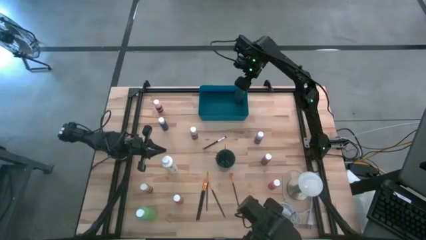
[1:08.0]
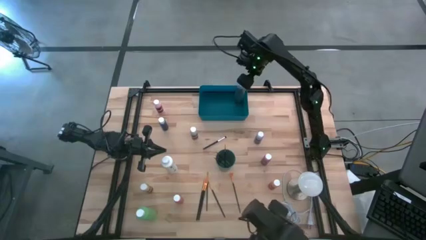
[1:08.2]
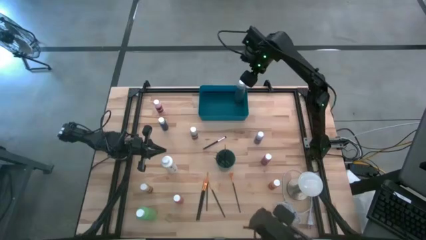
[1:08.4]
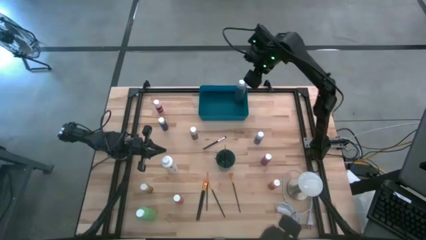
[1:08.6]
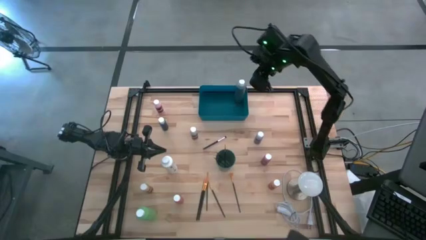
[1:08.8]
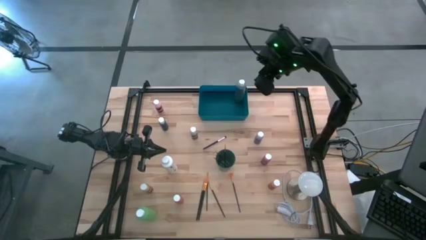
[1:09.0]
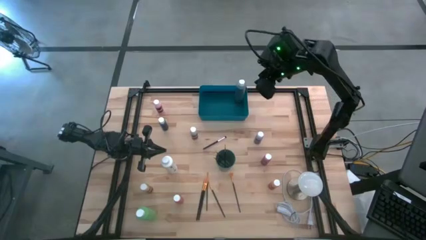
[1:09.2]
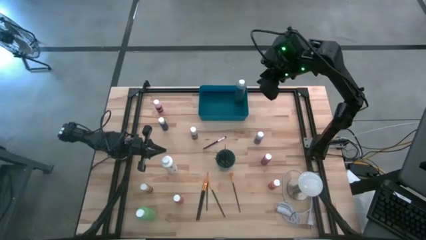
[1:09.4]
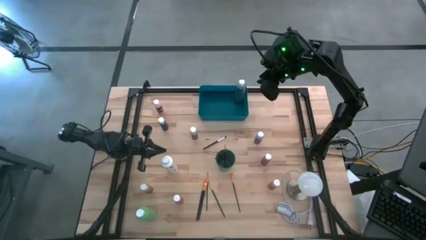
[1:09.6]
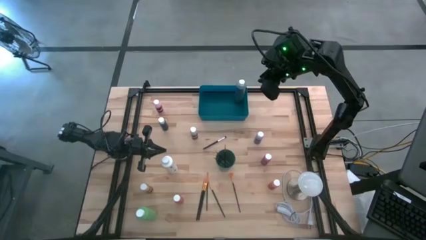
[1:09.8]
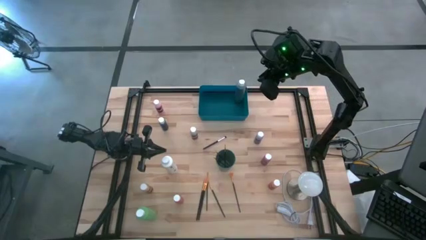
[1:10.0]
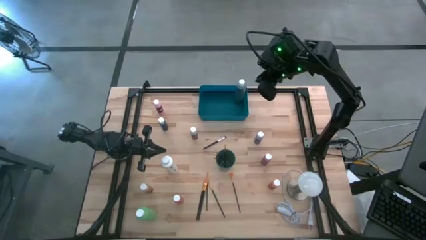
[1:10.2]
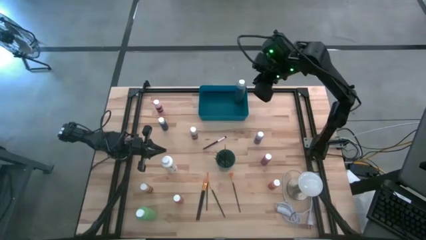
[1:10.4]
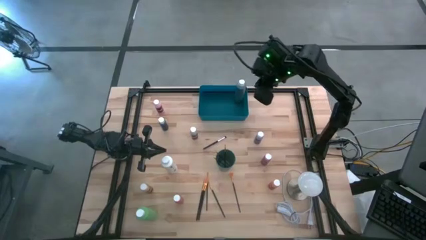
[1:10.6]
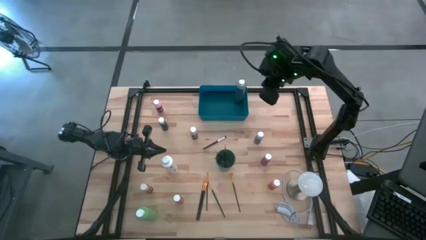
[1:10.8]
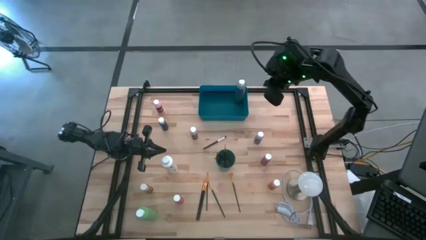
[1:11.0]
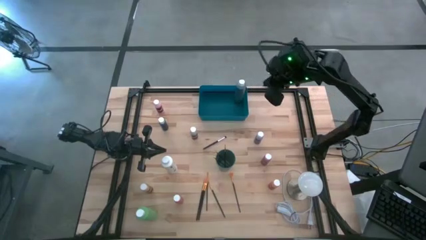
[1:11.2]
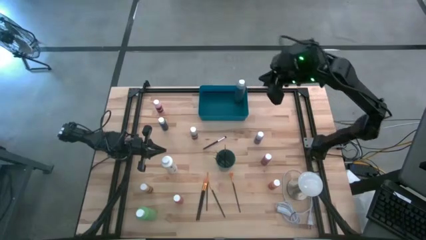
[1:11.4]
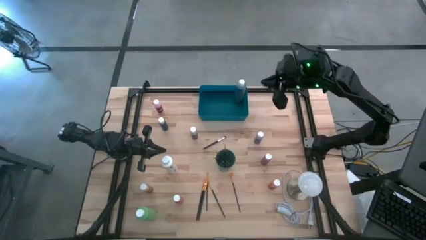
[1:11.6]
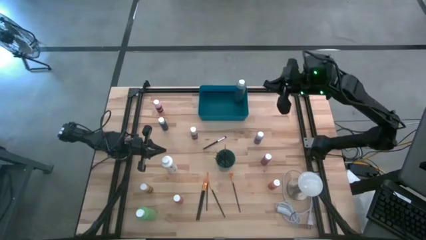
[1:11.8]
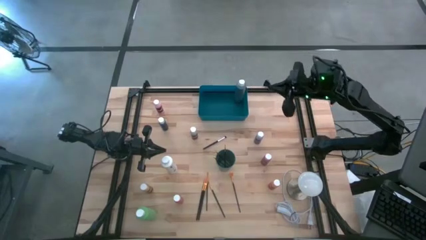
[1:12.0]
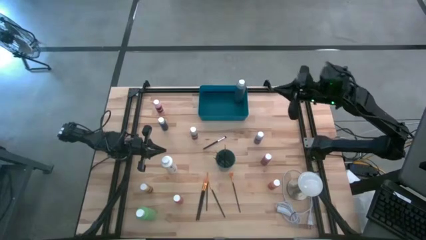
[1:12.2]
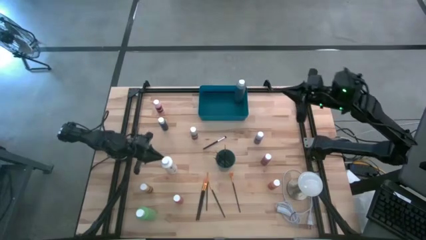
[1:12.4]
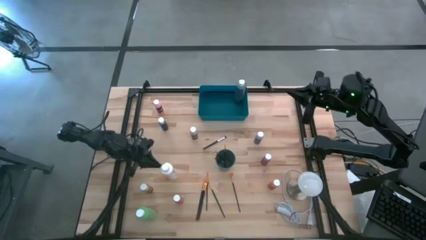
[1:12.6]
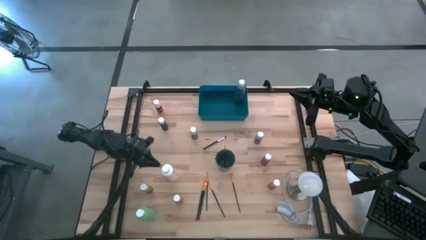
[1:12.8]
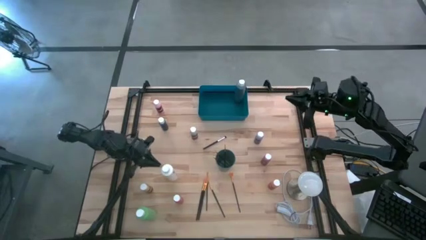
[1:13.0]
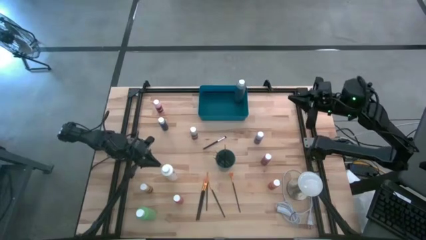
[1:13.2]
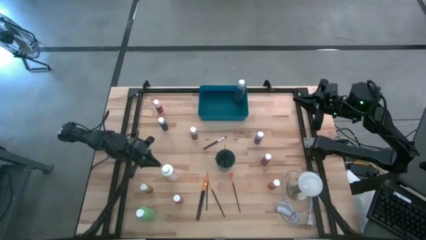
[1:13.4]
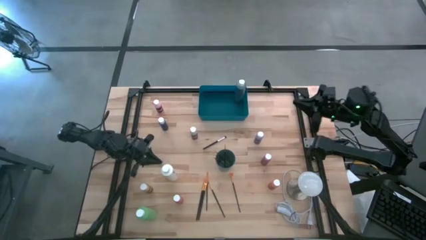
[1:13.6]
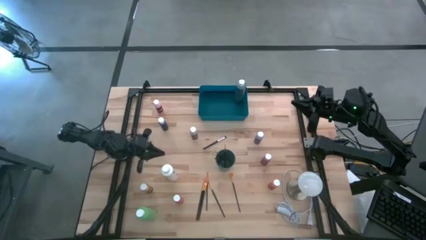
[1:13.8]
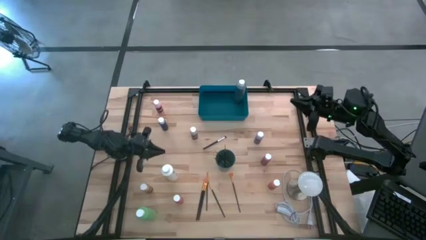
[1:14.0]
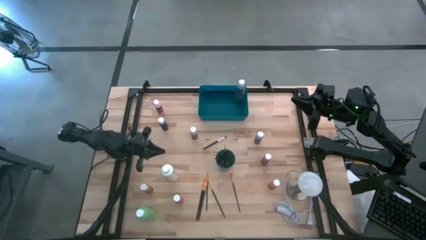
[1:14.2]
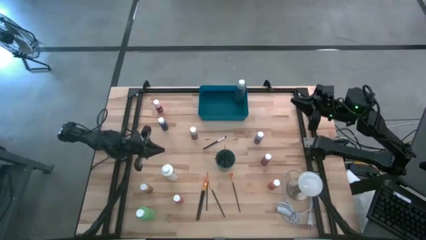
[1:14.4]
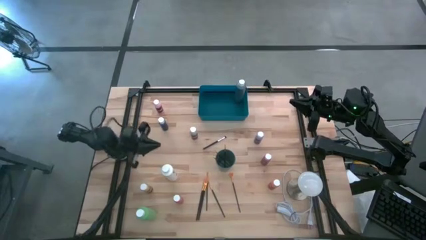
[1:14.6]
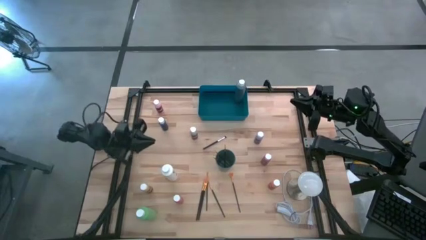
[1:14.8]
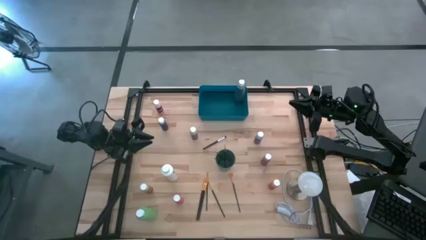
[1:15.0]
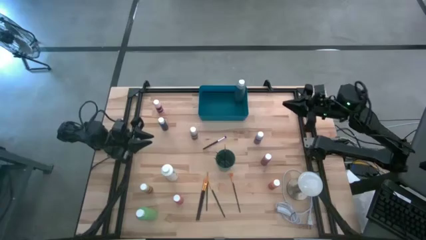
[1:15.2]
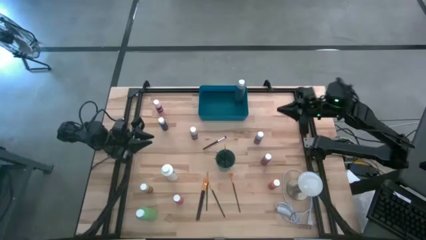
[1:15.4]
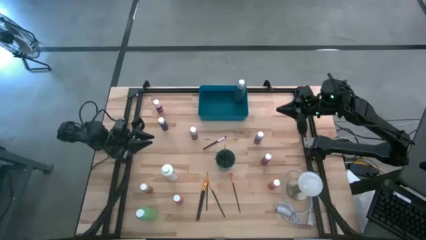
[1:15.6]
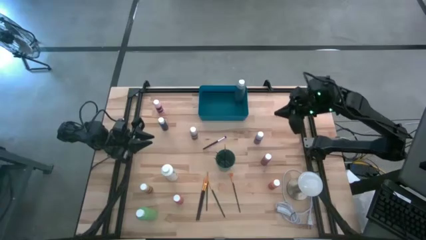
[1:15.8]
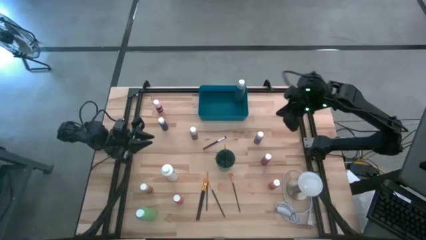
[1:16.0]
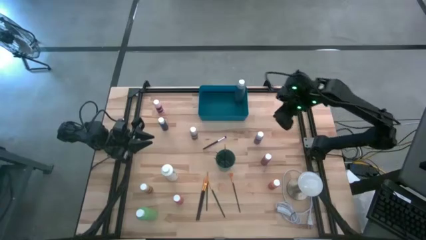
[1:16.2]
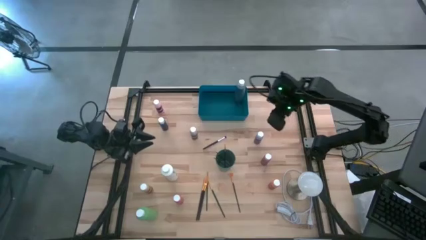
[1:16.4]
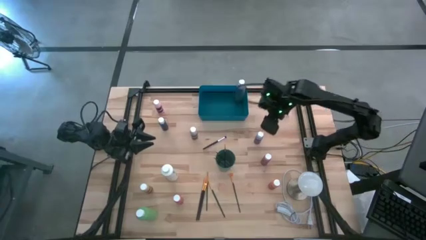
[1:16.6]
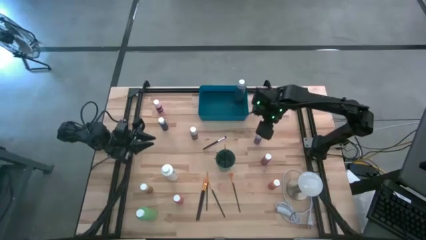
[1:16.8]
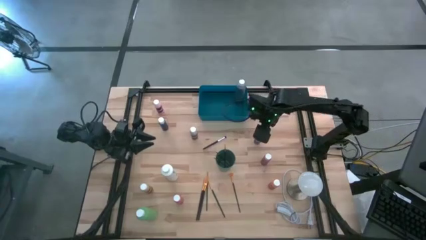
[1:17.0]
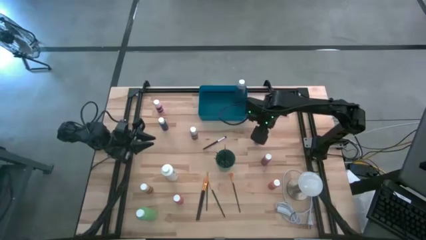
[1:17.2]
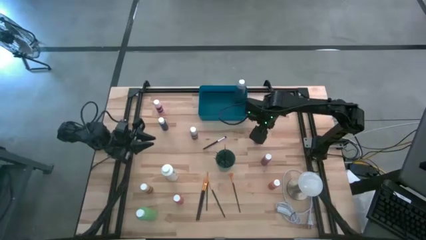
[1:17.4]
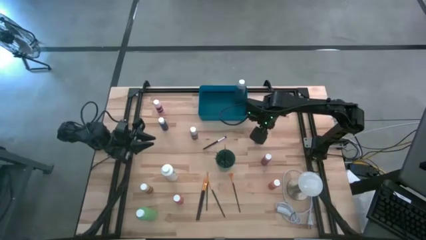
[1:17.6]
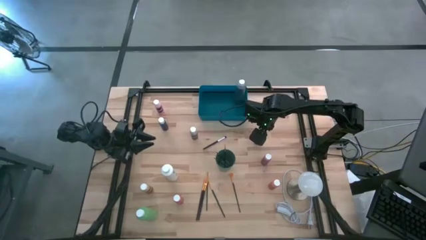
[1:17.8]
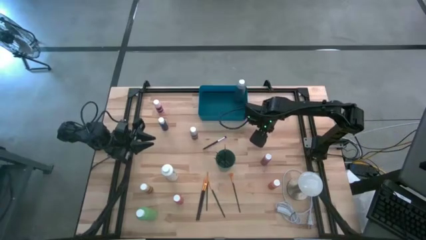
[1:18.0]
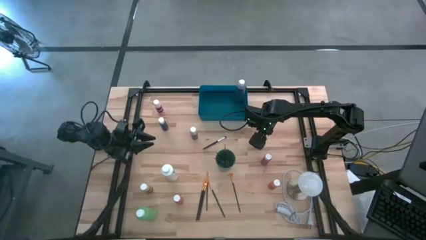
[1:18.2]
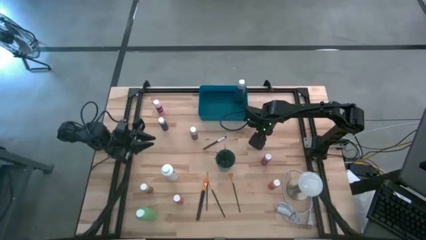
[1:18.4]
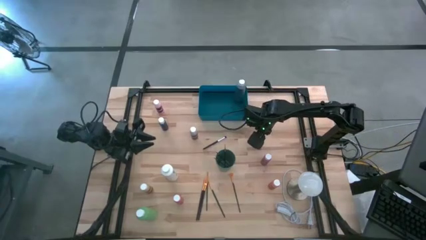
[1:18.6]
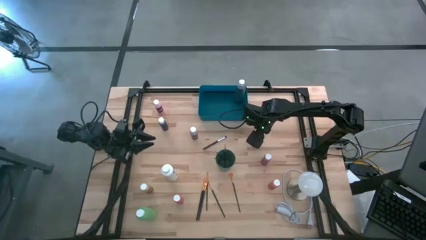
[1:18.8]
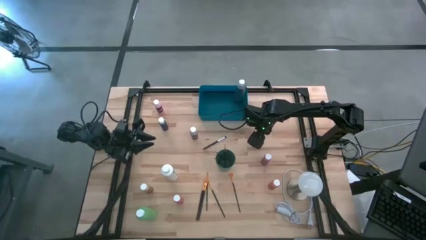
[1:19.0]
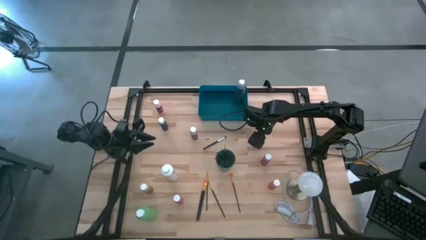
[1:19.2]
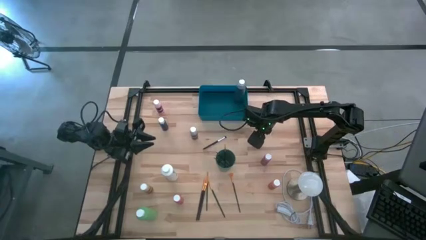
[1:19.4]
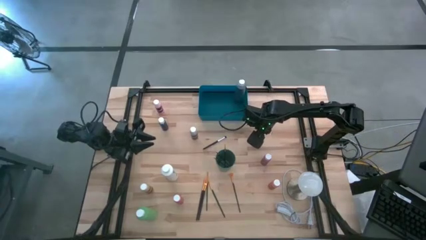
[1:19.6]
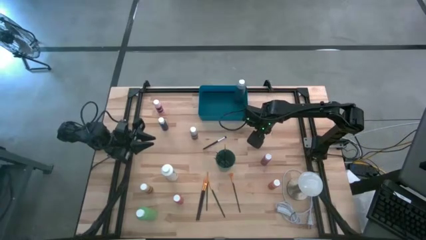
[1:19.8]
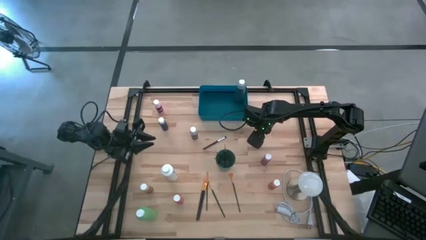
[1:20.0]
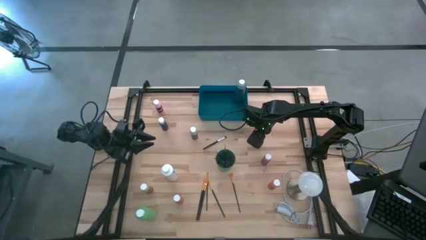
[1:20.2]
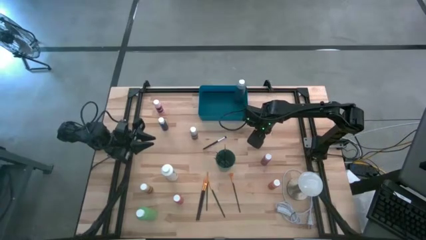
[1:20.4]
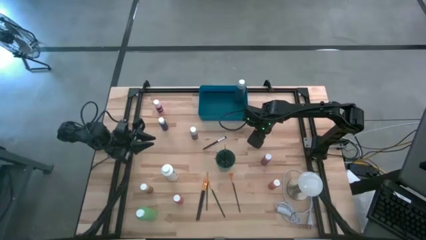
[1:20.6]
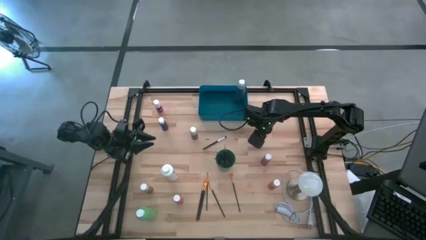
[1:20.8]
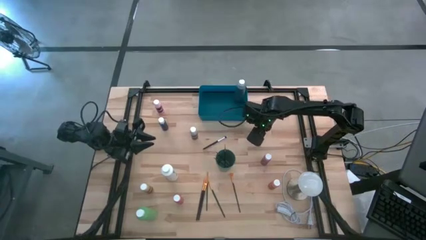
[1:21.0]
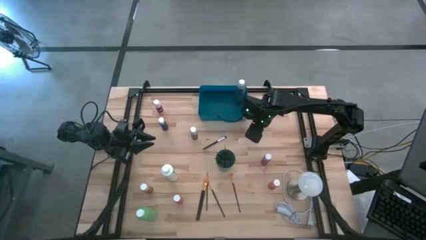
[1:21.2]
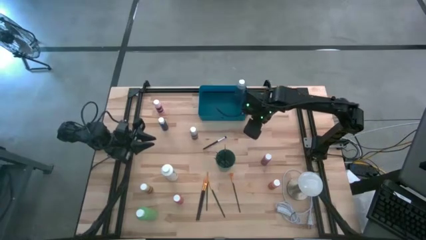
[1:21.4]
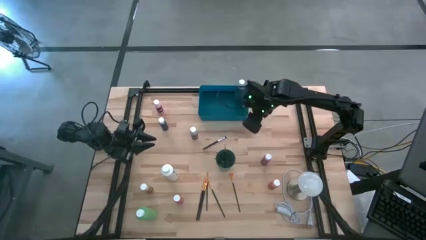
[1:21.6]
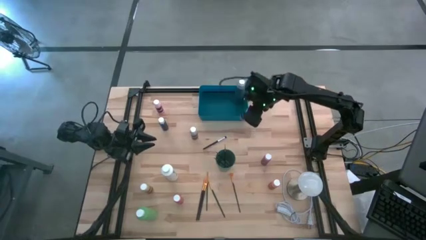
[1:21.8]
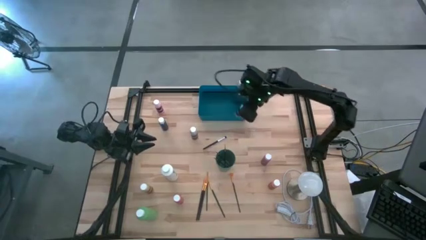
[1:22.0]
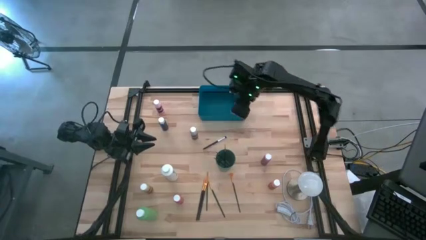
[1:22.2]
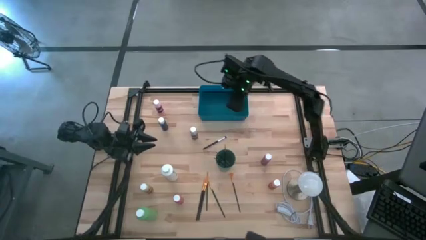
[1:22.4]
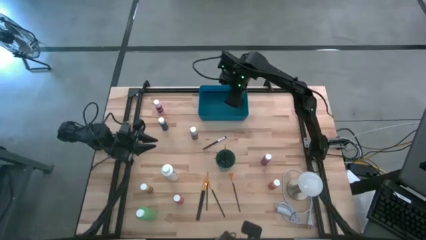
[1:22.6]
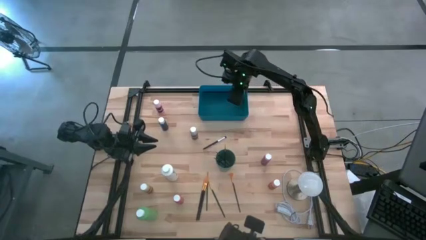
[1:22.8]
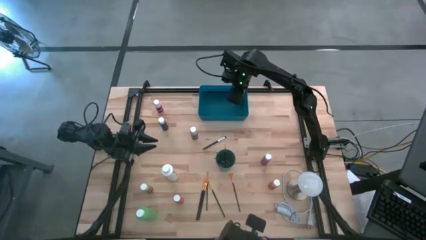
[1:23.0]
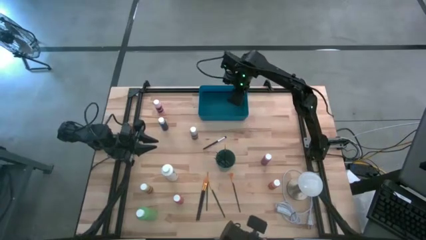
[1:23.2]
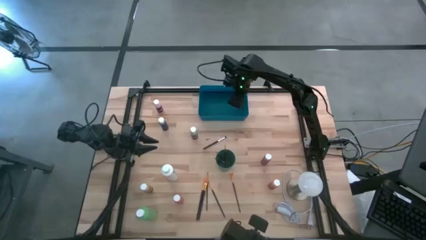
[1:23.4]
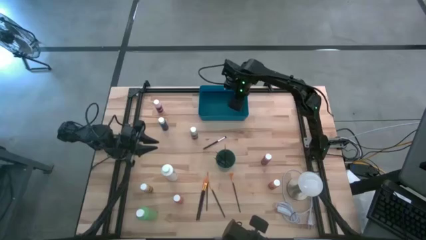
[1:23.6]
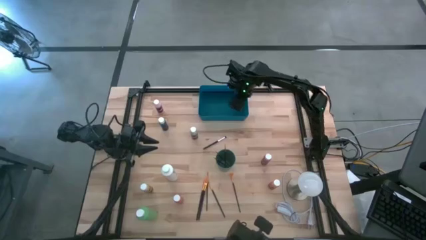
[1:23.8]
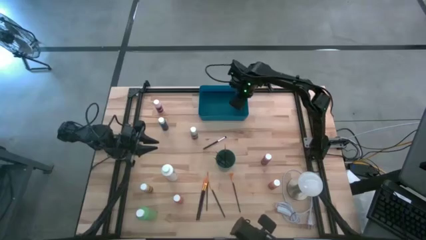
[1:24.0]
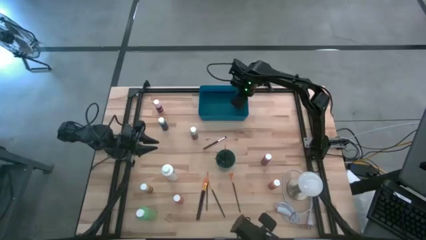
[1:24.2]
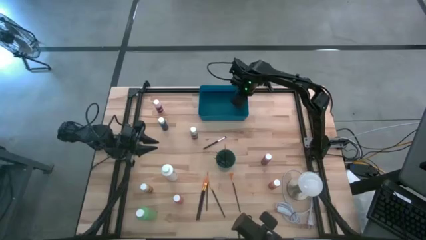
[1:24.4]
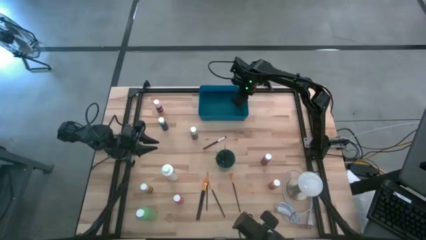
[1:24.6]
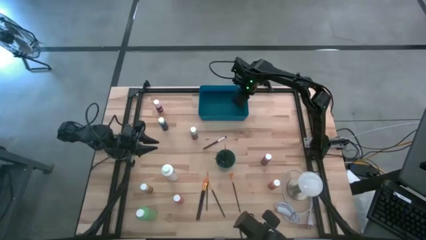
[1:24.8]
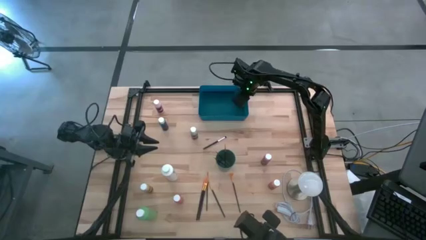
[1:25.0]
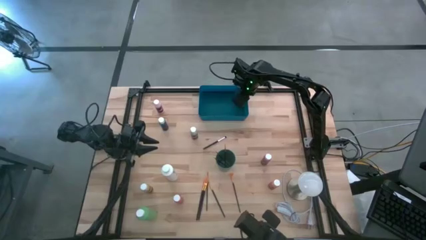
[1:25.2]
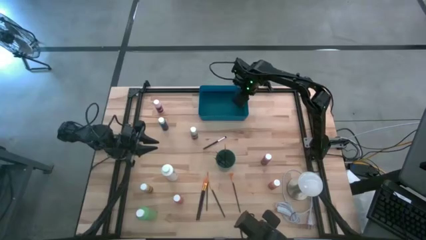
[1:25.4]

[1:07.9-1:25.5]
Task: Pick & Place Paint Supplies
Put the purple paint bottle into the blue bin
